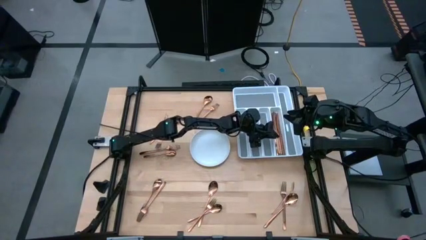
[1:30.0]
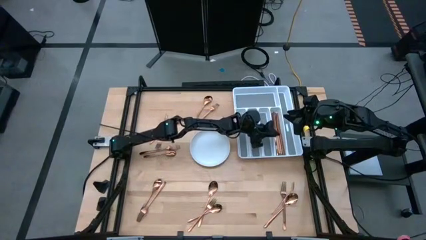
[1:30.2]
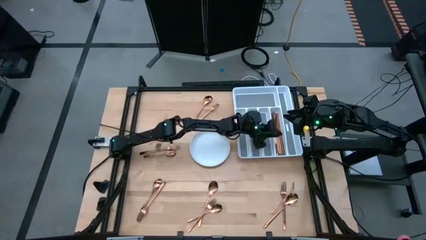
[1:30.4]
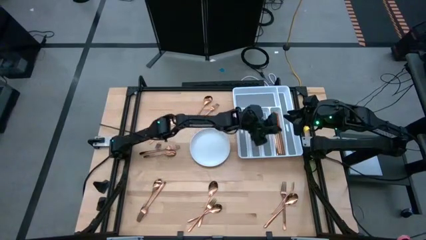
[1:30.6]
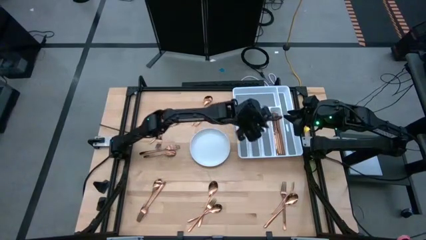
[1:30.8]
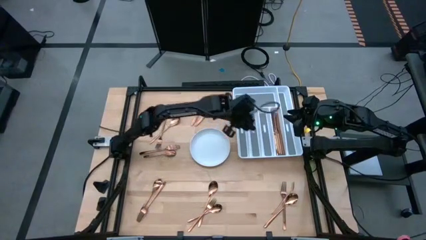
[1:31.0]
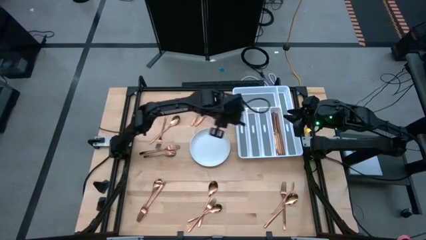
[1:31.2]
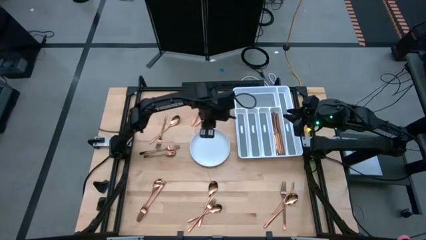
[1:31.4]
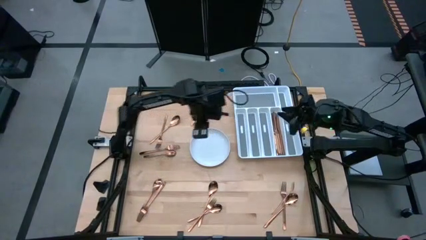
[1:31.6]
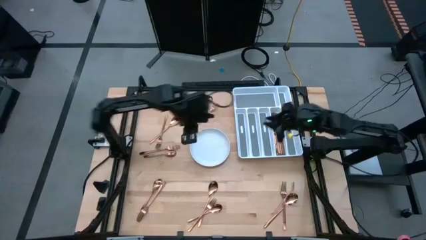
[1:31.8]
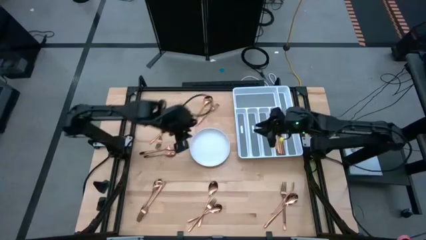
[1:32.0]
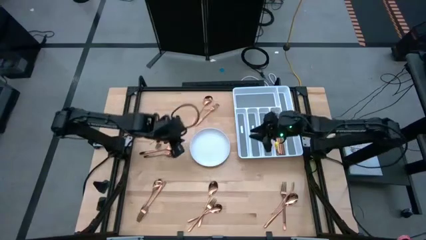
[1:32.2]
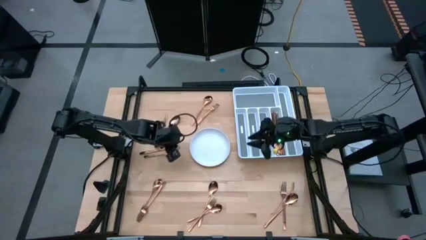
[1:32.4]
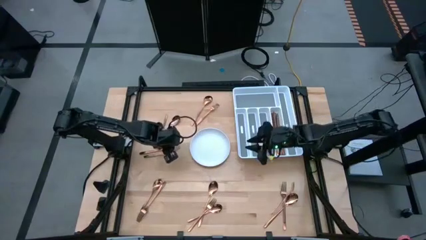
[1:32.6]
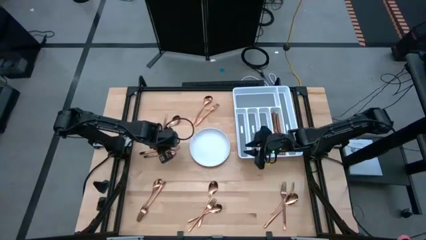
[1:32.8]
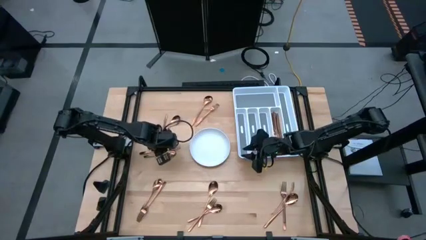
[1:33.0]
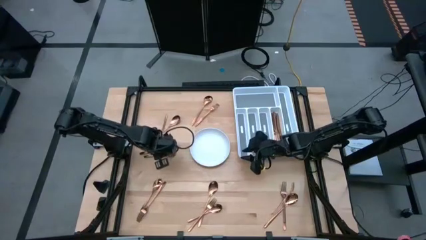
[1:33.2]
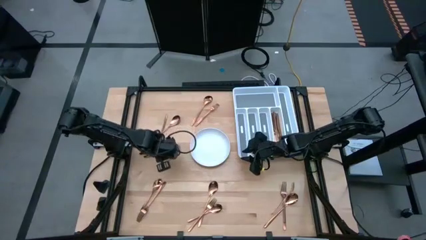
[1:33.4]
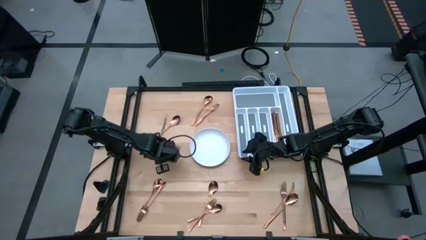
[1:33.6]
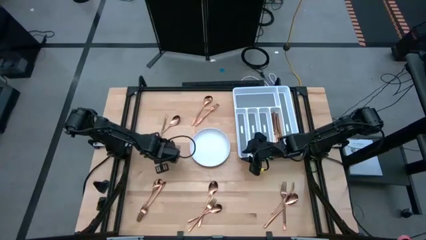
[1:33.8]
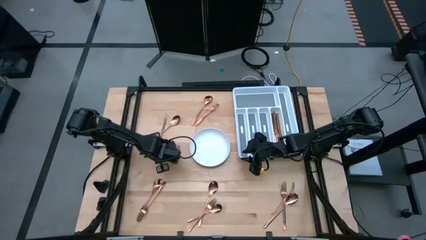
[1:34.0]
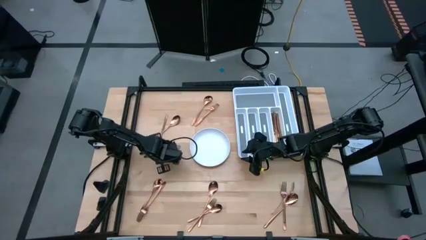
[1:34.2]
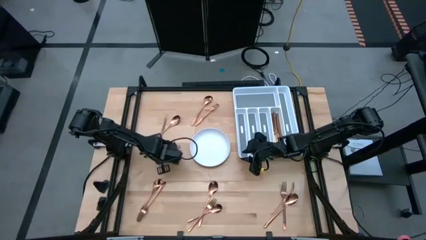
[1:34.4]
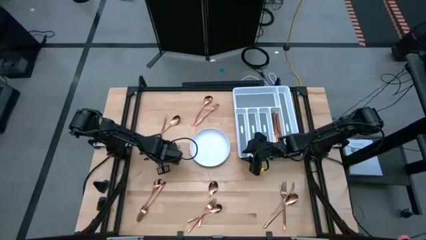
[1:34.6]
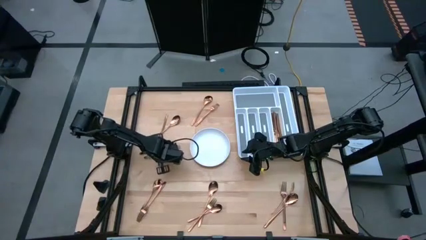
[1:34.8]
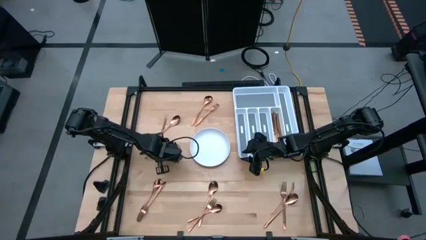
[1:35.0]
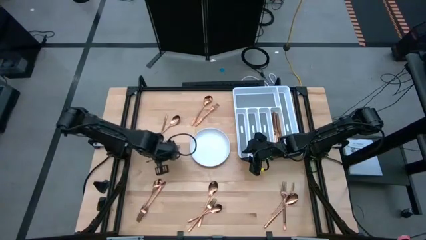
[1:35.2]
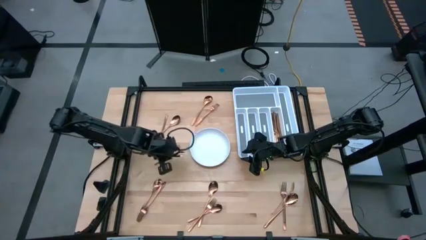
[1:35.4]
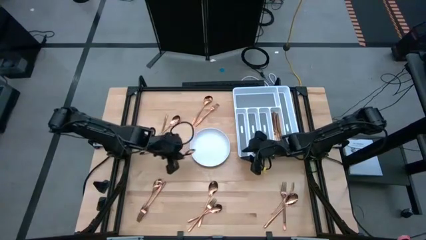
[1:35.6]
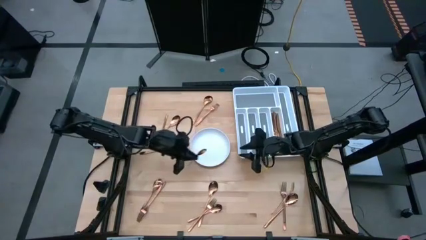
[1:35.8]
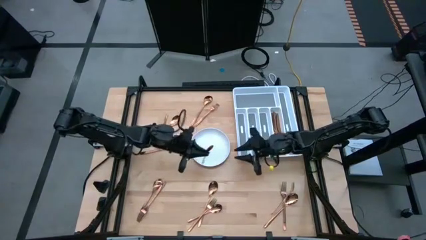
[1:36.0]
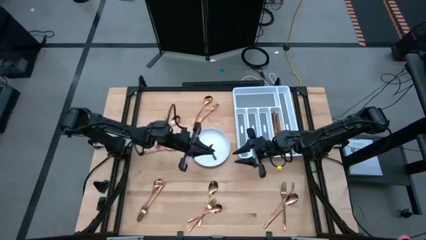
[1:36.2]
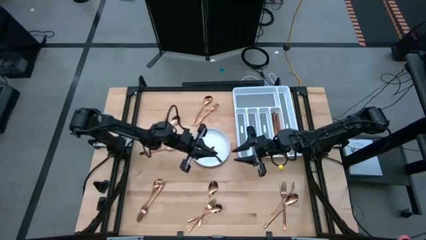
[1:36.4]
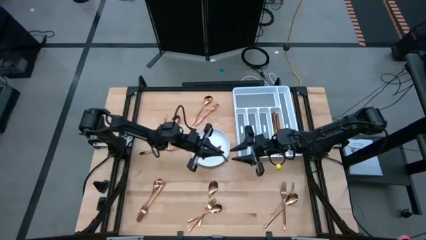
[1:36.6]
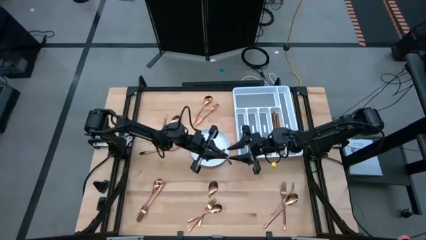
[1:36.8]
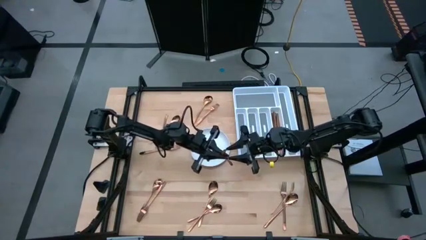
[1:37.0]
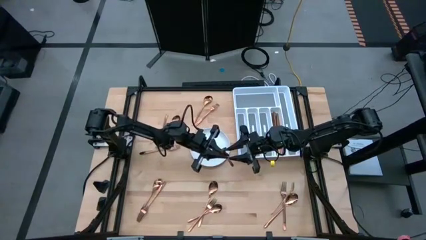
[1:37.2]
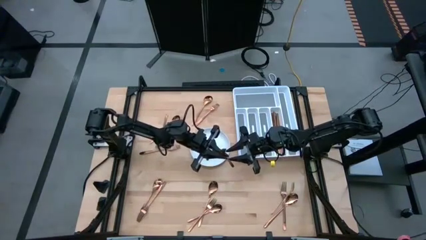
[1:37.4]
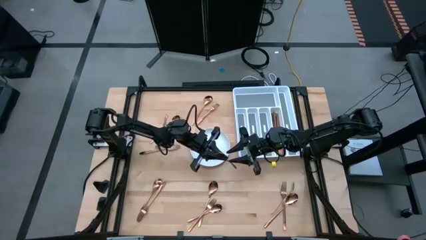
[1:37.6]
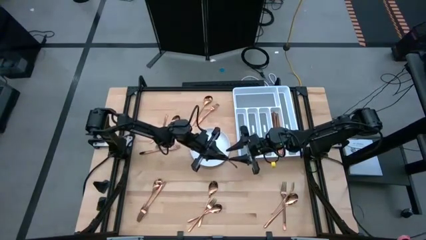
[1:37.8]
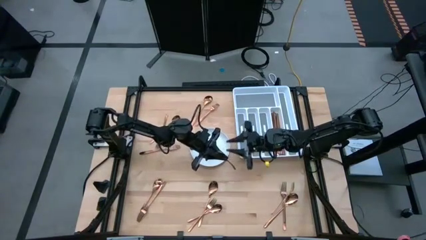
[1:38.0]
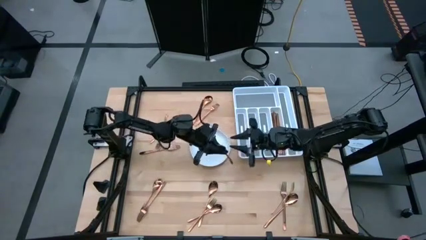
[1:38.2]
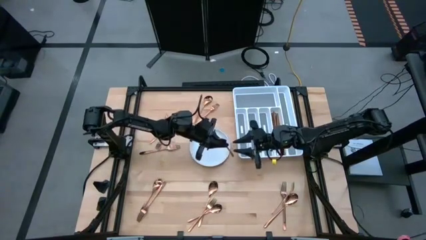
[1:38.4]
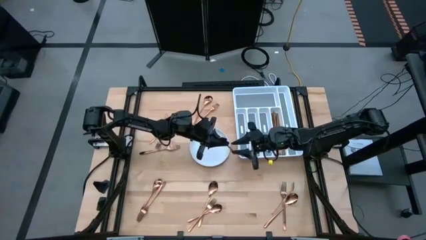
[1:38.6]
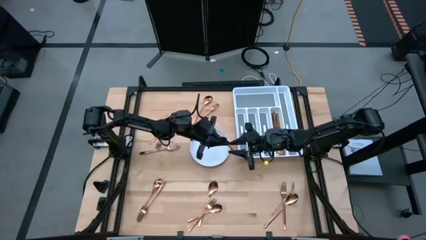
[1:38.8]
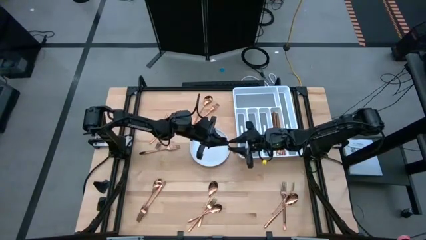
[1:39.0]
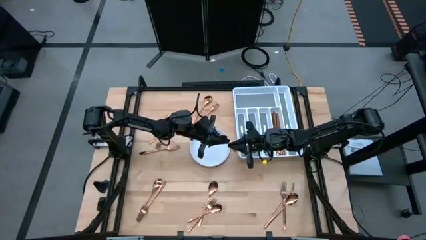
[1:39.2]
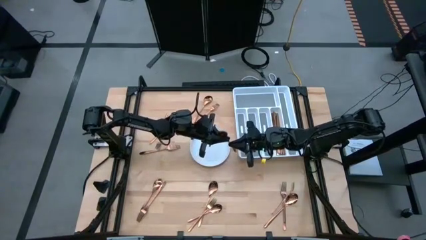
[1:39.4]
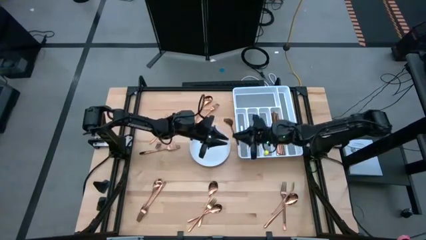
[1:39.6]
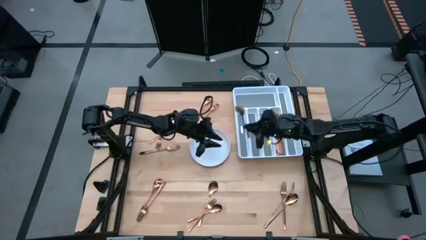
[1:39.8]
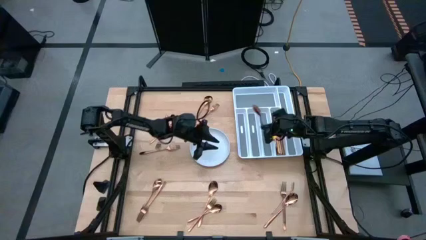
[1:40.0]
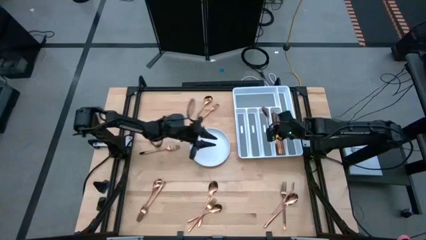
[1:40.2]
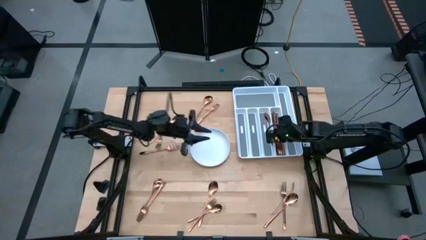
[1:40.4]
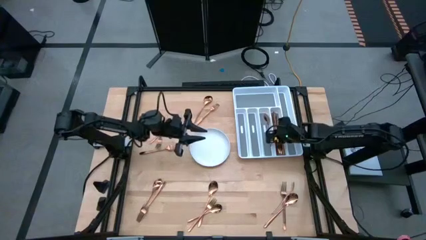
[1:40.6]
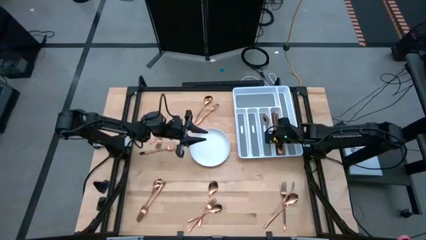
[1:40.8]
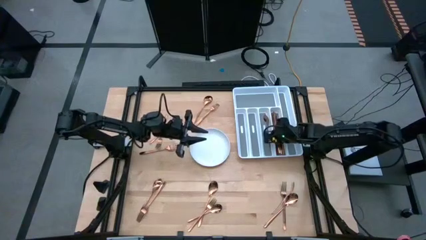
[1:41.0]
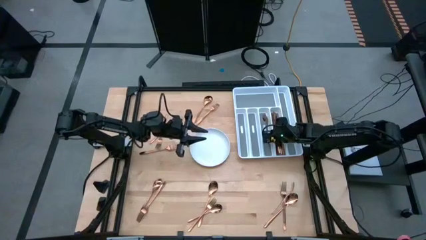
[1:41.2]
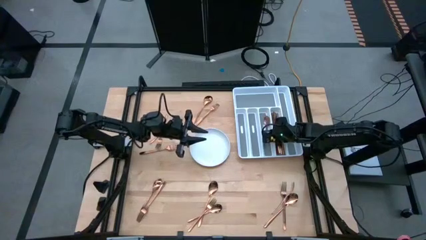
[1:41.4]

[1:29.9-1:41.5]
Task: Sort silverware
Put the spoon in the silverware tray

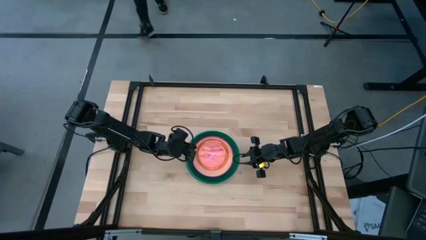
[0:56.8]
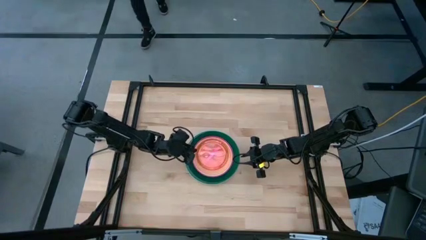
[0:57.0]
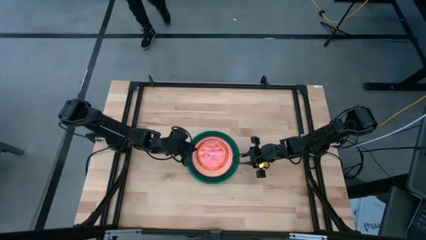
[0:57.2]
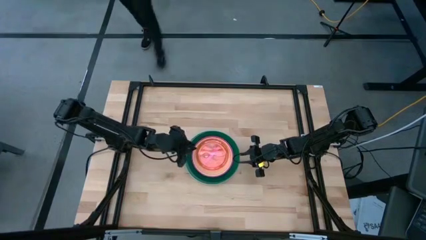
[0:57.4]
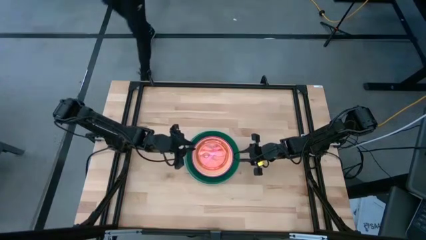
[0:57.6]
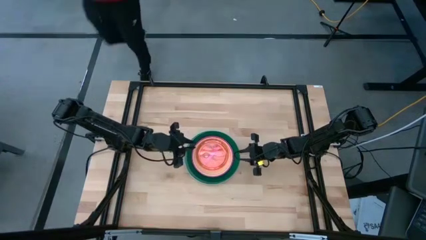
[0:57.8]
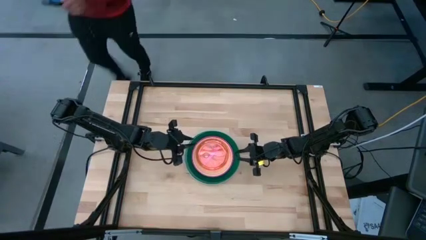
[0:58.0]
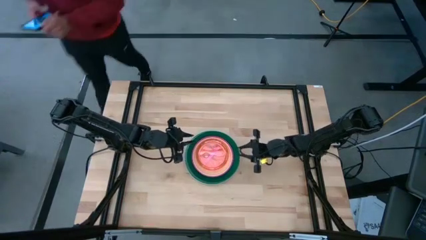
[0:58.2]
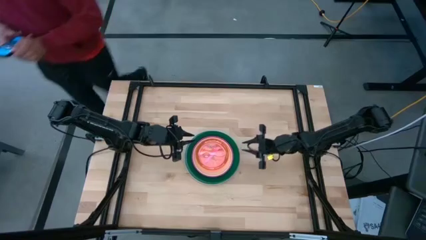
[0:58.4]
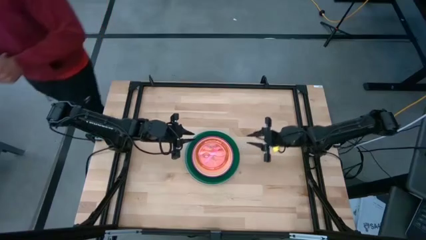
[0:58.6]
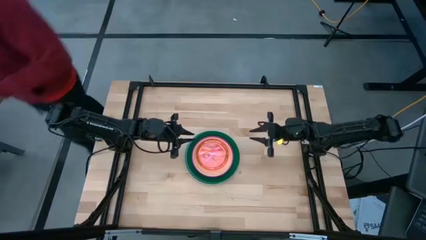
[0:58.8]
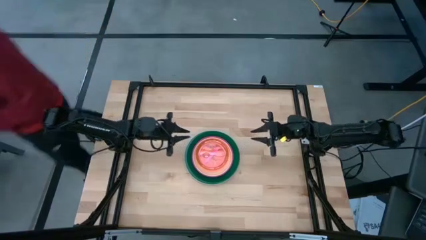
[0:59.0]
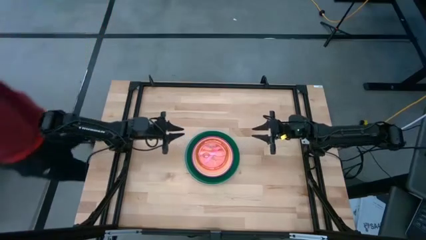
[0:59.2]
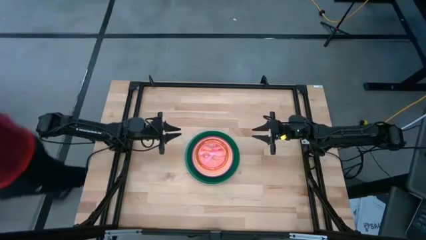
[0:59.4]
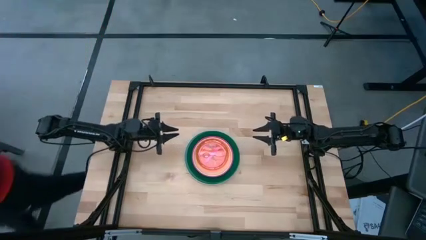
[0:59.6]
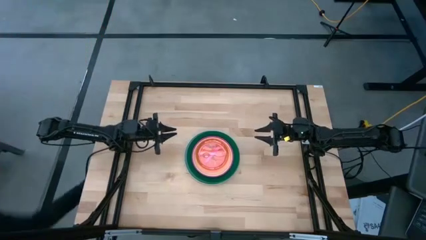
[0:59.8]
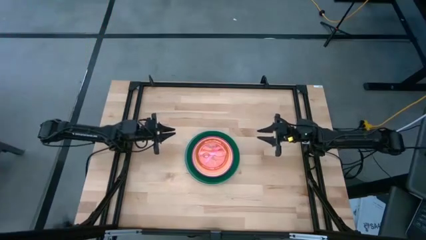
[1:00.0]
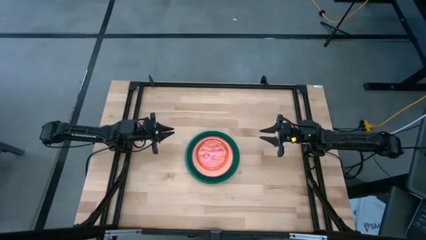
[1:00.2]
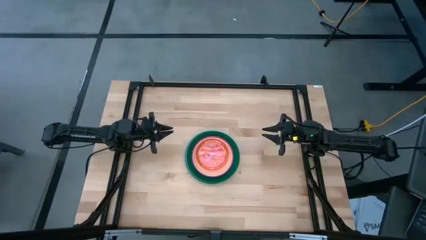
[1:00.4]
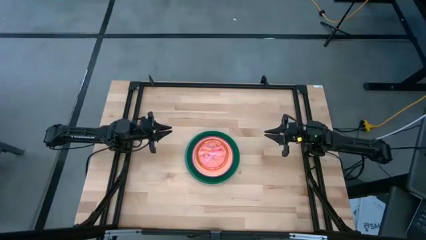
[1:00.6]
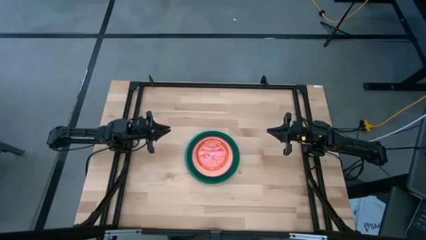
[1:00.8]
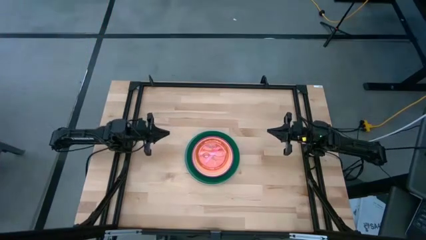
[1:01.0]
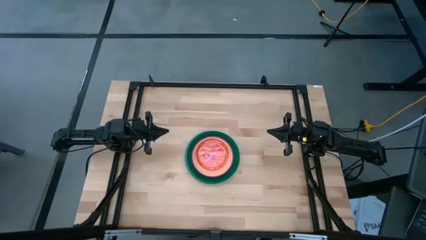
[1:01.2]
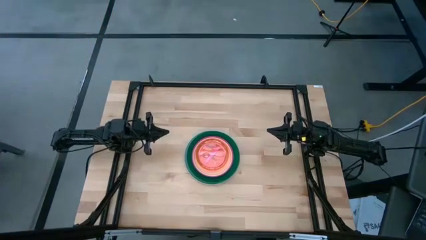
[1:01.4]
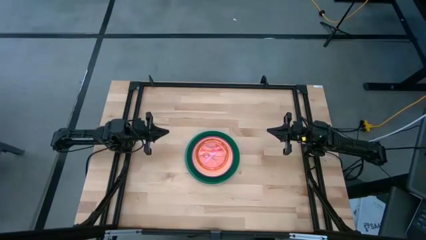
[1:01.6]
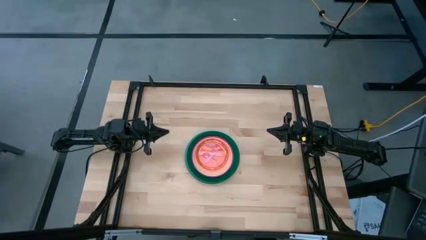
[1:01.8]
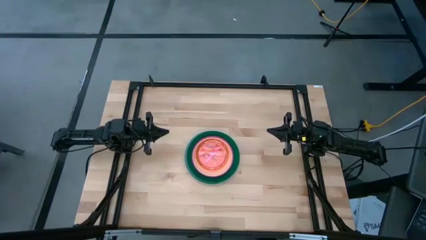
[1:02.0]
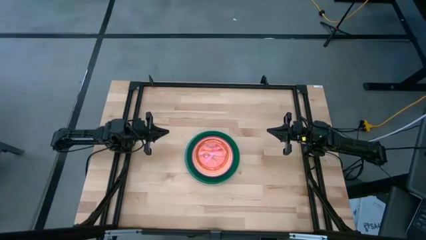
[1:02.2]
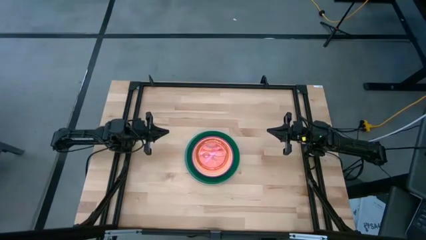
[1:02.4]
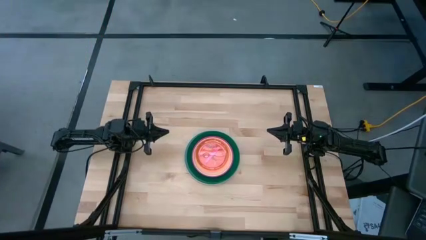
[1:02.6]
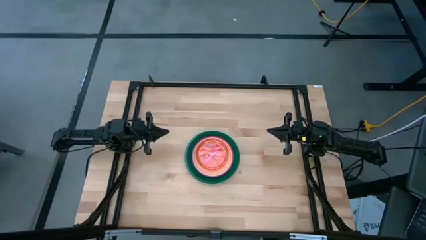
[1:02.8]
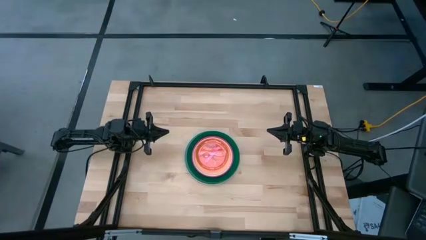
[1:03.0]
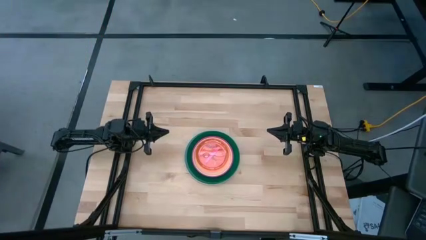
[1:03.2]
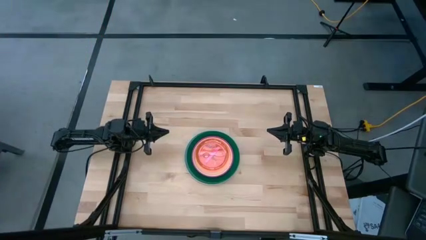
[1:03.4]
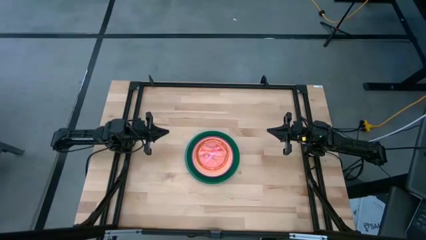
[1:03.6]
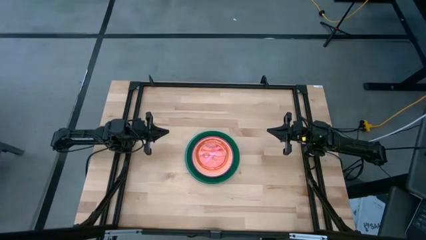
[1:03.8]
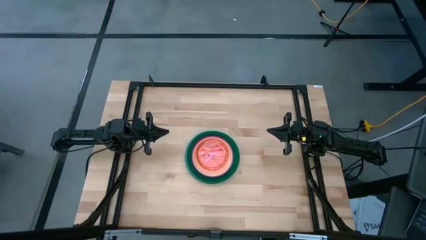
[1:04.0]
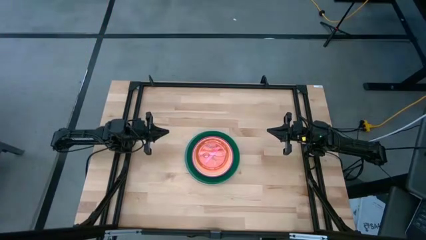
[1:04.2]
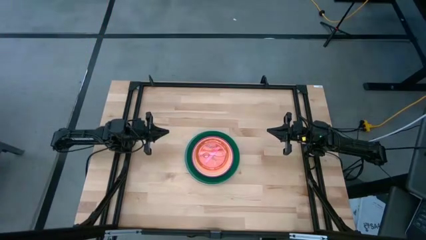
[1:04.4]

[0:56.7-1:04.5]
Task: Stack plastic plates
Return to Home Position
